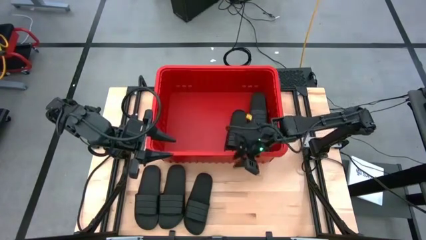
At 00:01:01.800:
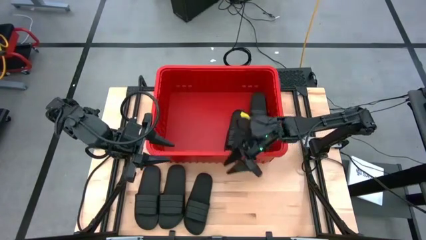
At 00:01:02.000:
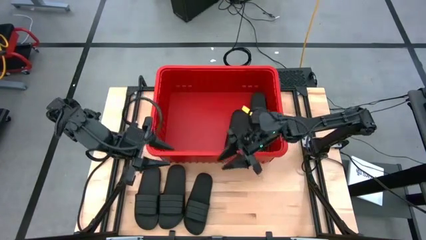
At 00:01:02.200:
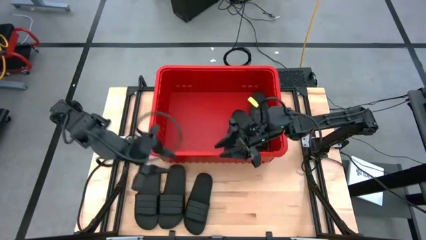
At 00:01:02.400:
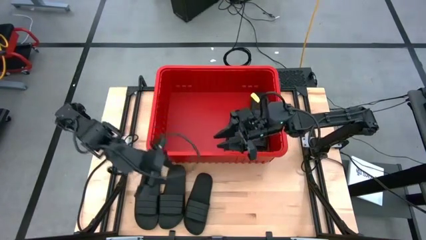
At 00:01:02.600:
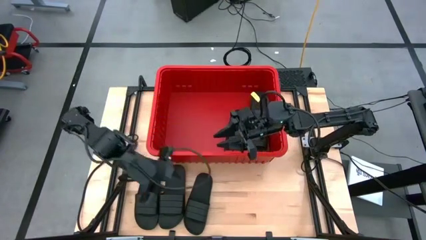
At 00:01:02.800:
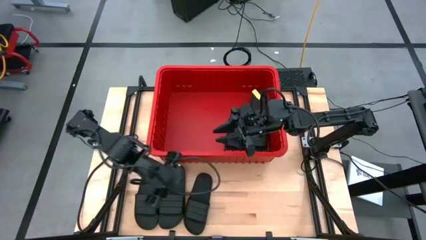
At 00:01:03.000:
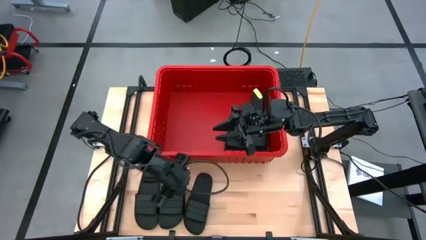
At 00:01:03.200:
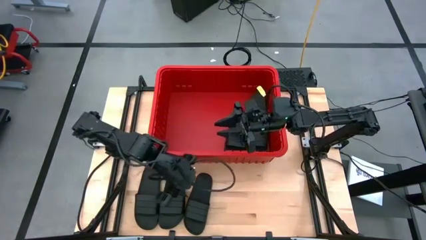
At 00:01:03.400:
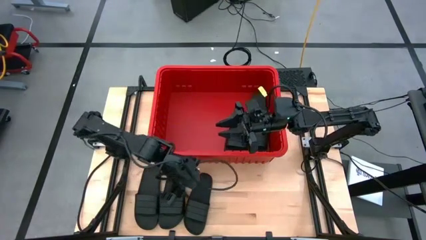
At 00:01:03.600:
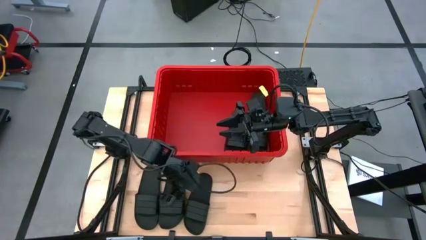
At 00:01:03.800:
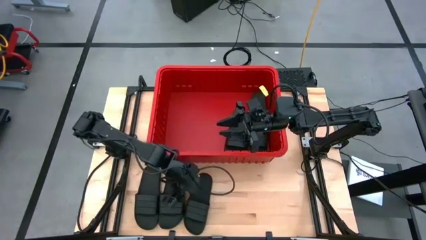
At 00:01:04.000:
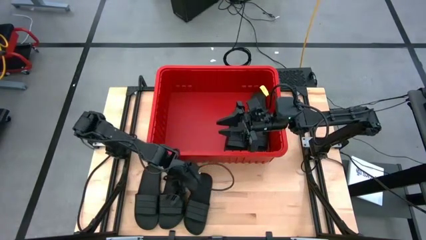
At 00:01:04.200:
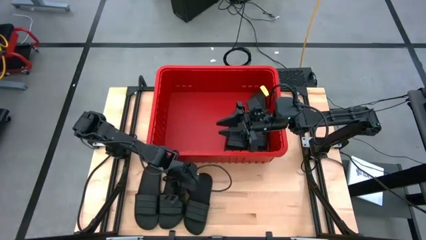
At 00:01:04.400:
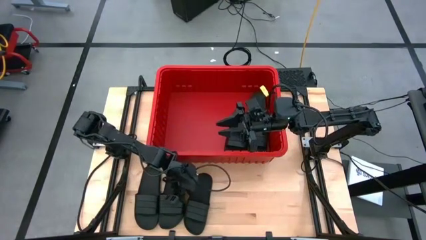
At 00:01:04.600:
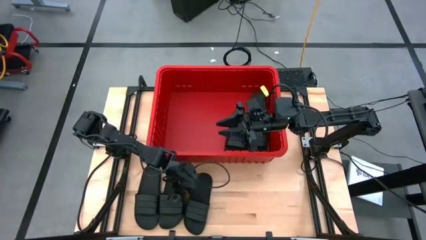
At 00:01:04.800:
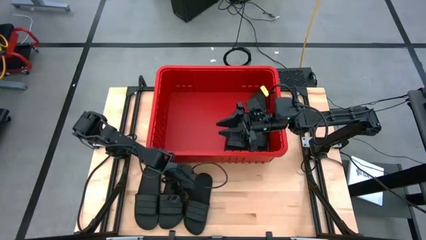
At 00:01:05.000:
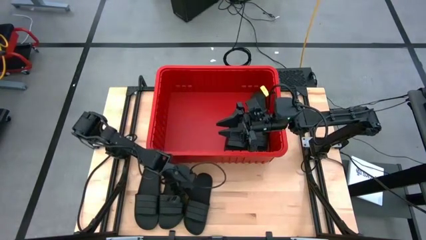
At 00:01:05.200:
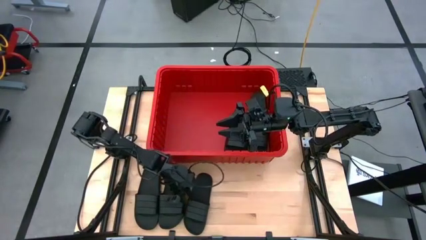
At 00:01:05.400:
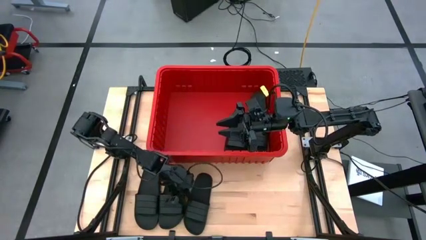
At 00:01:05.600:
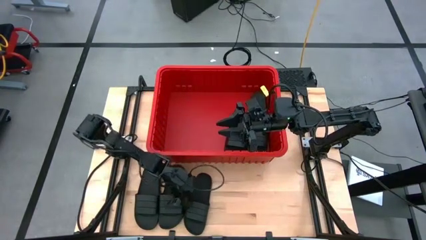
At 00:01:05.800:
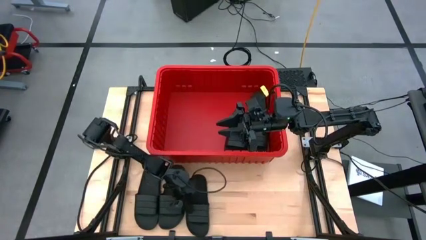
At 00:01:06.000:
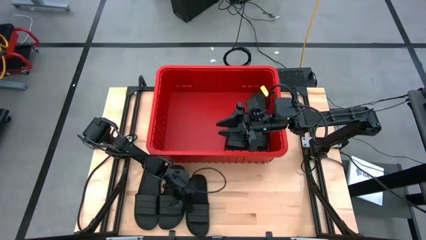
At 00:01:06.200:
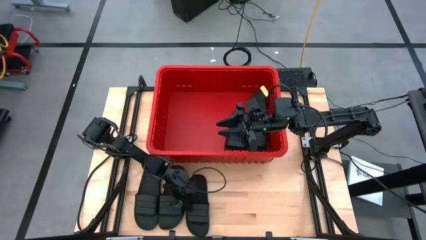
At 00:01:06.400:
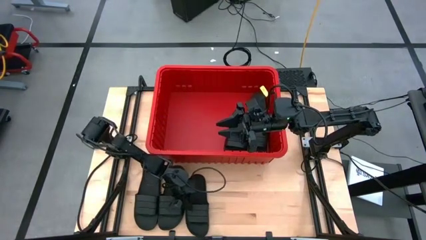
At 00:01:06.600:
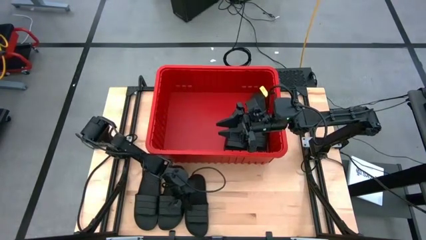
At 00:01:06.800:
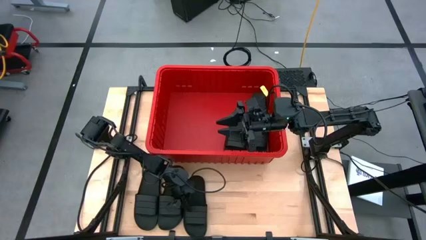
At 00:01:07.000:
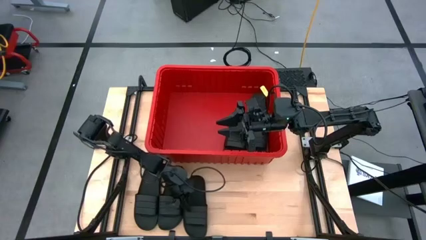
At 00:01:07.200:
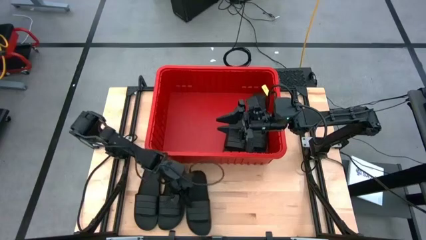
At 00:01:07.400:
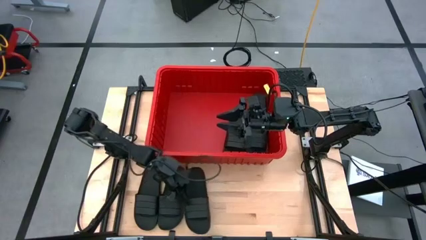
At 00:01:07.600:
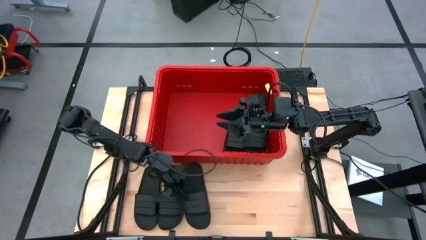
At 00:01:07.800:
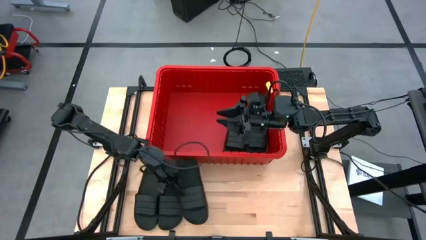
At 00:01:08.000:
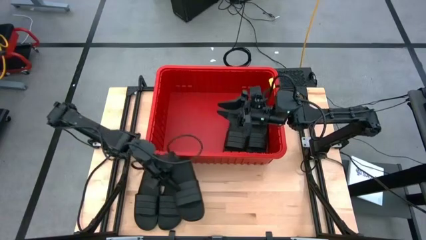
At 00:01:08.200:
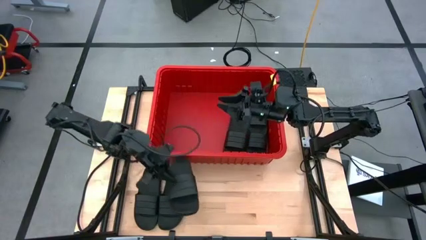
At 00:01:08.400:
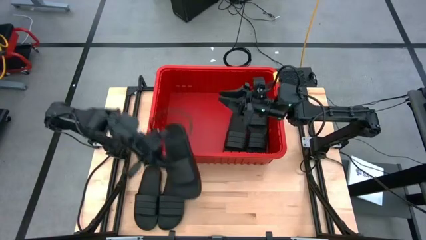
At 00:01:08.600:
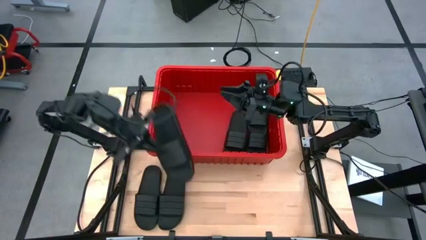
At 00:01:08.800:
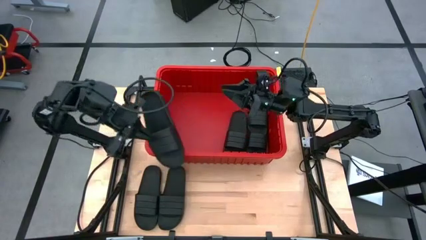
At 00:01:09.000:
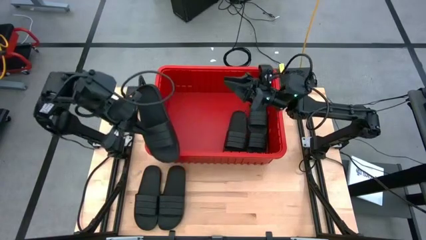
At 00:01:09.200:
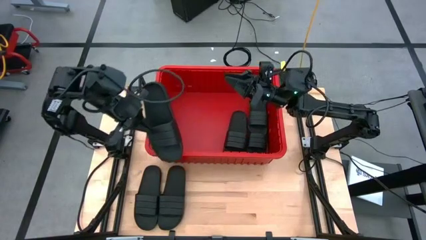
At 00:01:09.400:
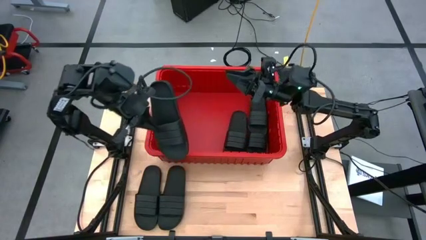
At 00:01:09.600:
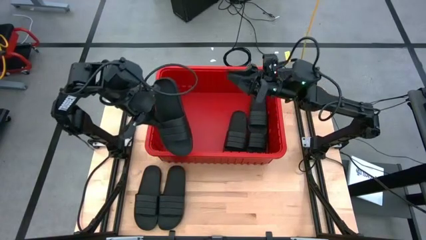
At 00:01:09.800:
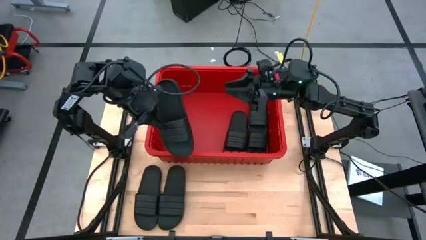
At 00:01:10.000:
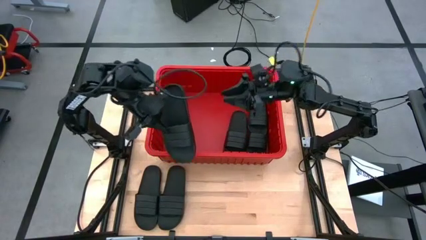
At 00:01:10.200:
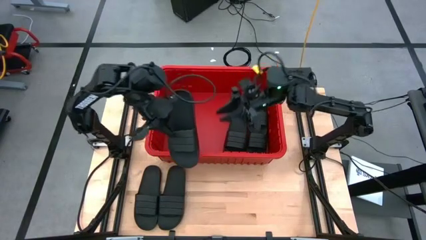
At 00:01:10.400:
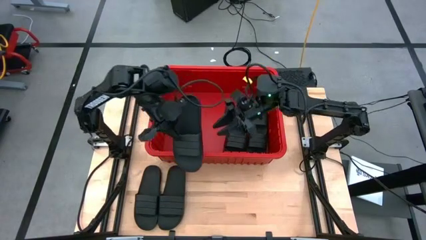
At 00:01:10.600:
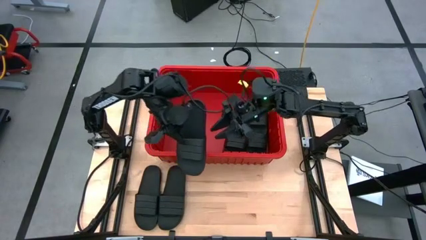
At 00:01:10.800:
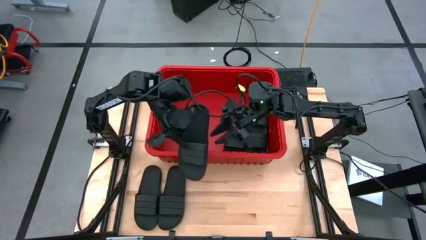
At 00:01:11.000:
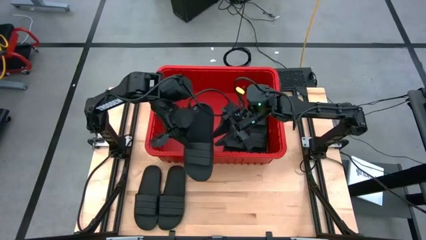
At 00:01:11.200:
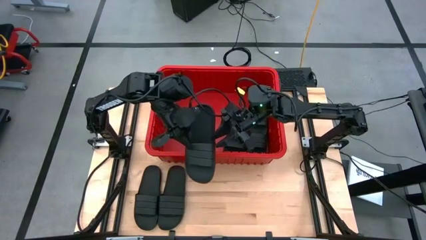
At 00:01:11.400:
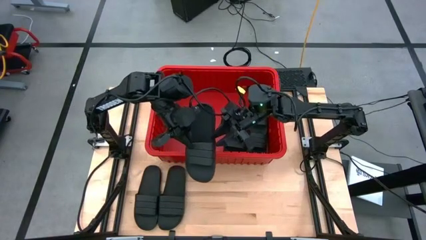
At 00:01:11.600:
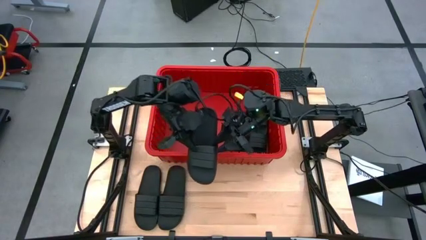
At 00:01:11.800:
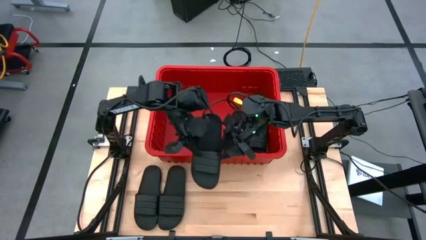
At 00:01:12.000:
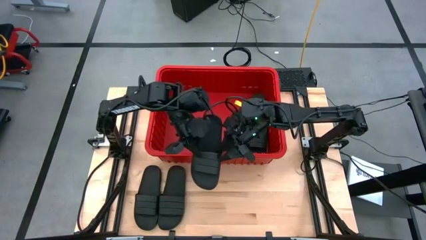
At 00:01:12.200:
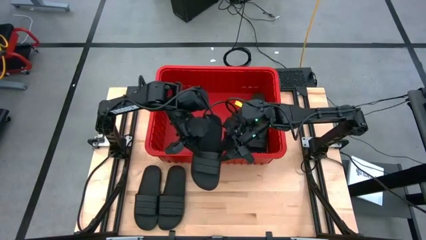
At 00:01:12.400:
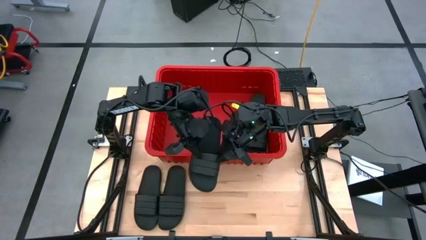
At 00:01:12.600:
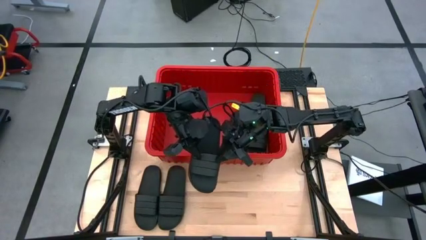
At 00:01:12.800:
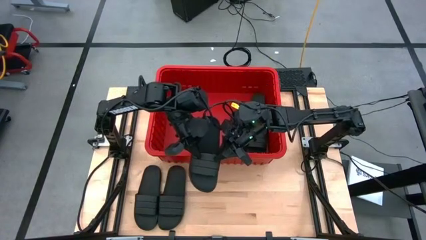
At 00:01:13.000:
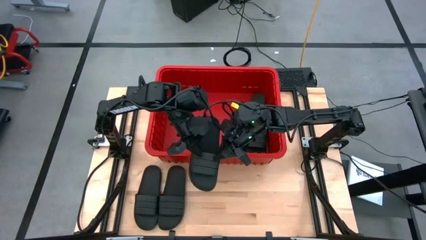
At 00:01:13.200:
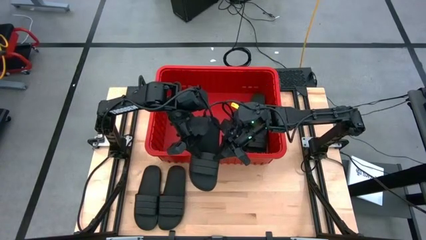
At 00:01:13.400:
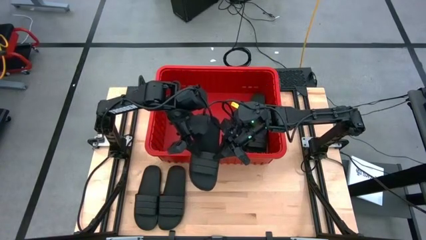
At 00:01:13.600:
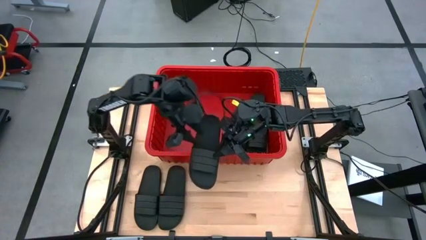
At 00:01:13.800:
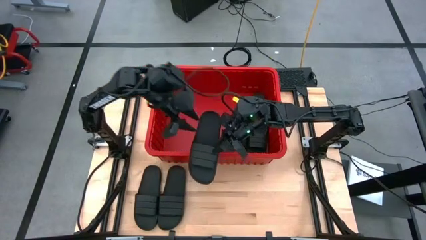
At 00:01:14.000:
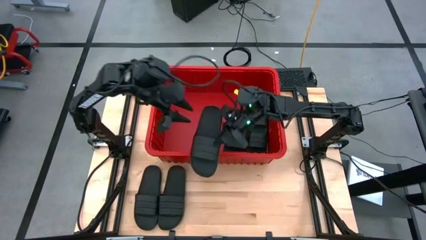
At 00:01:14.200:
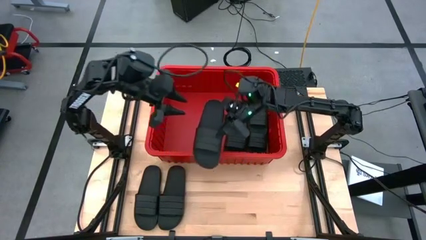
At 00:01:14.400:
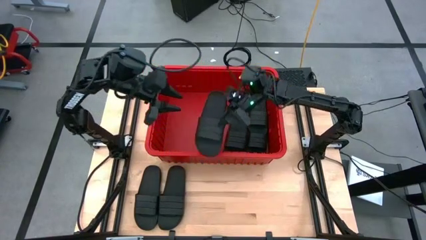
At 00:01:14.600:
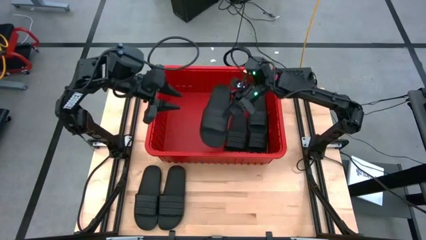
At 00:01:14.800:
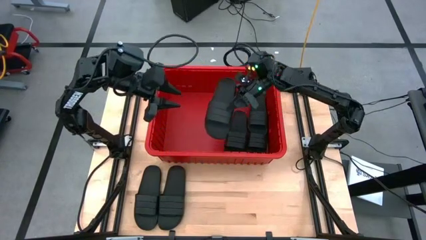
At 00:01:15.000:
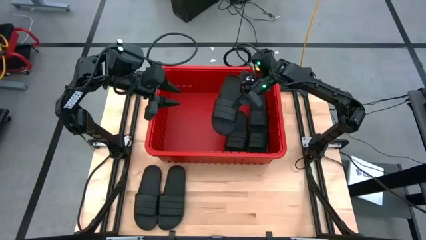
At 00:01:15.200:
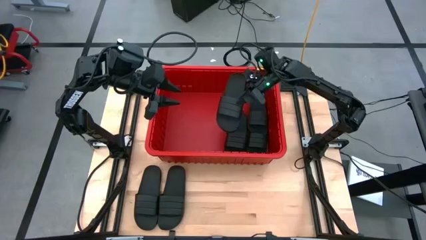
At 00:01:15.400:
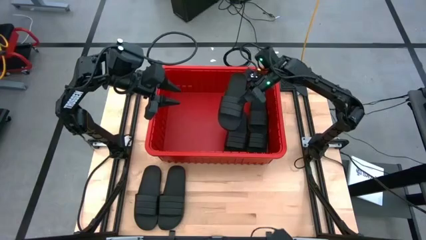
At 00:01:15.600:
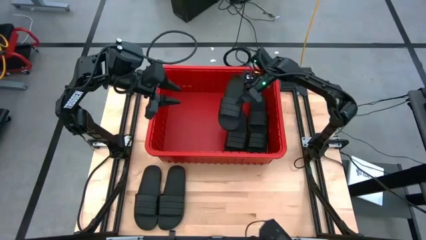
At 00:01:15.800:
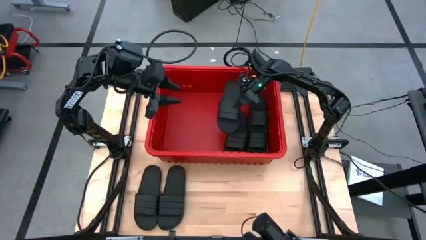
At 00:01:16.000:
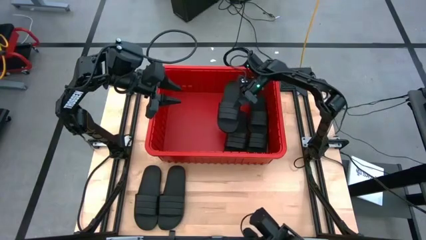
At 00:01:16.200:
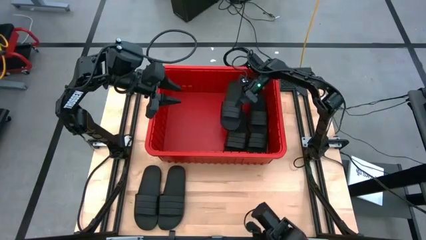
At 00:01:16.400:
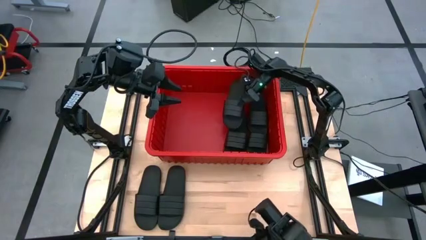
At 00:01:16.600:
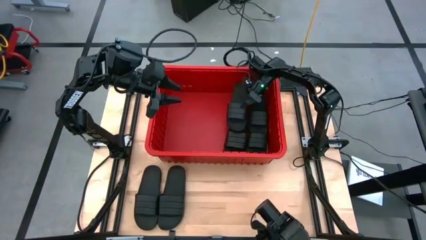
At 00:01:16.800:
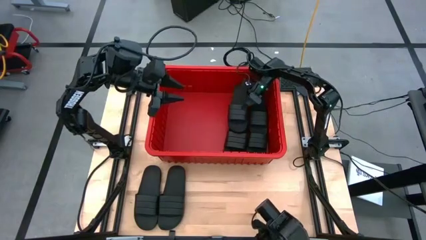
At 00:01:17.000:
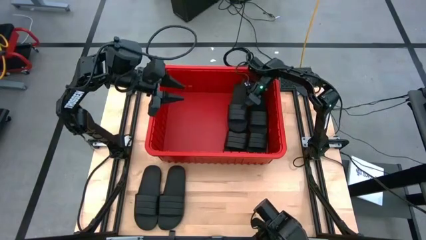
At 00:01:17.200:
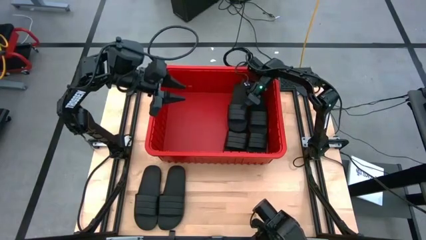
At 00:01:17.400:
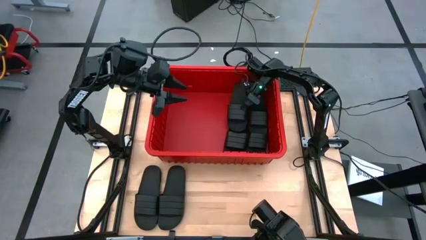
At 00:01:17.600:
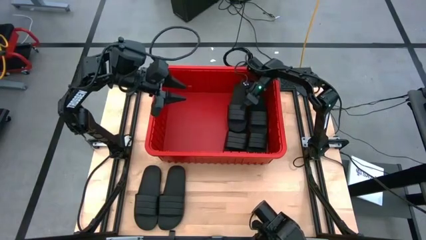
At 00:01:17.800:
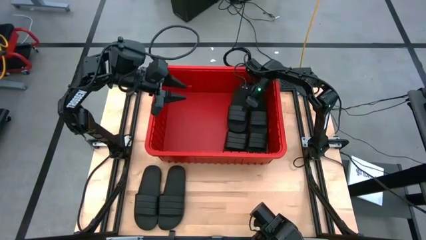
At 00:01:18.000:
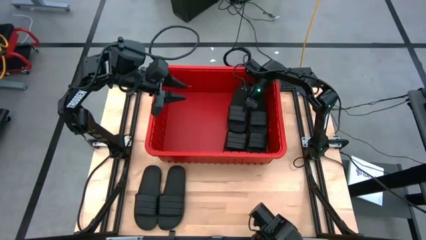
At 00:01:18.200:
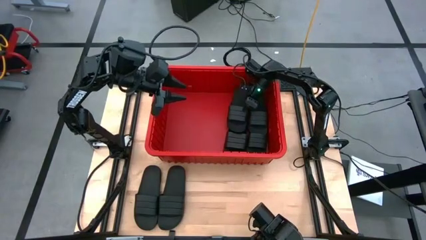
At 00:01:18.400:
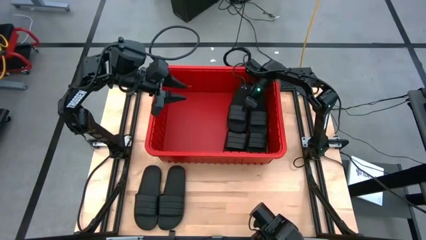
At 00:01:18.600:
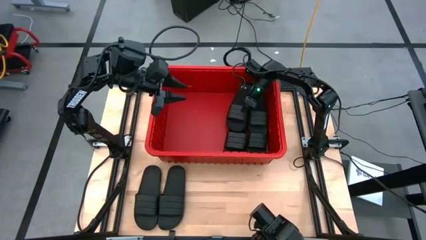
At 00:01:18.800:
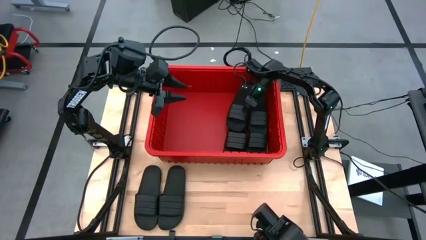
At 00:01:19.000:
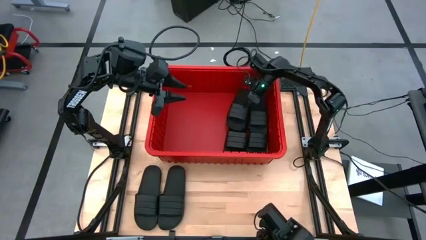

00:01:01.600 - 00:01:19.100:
Task: Pick and place slides into bin
Put the black slide into the red bin
